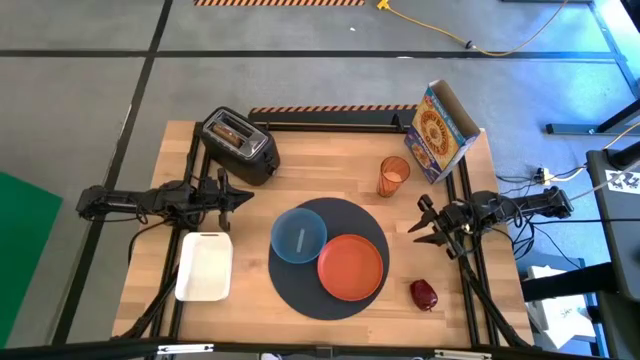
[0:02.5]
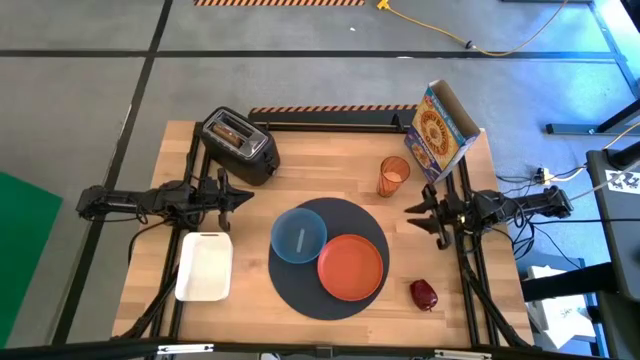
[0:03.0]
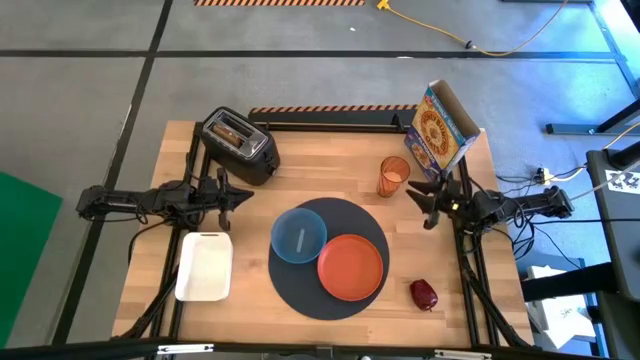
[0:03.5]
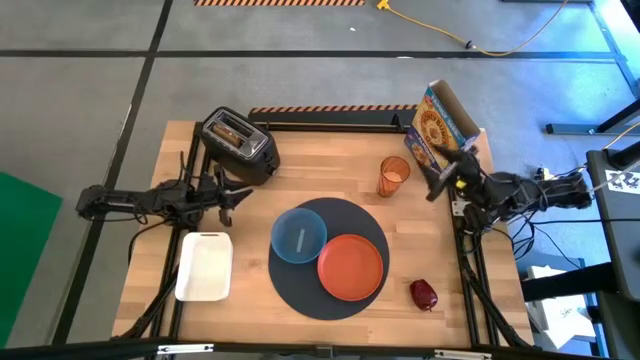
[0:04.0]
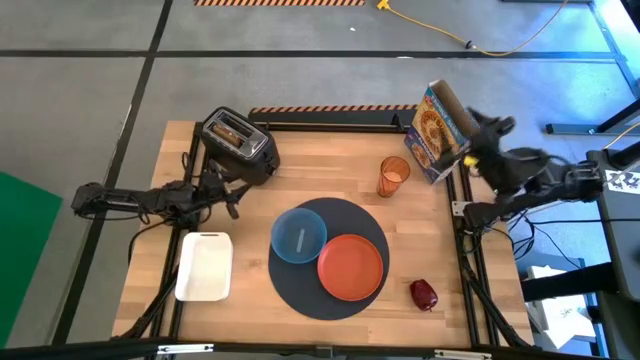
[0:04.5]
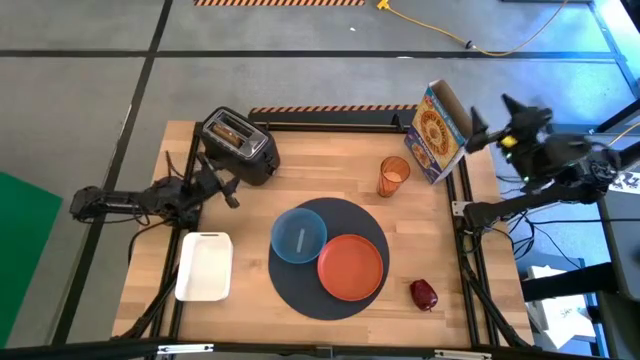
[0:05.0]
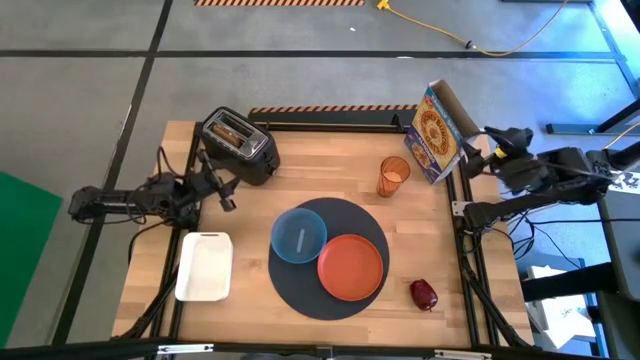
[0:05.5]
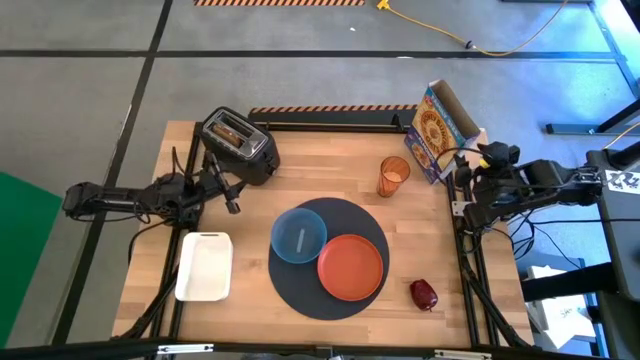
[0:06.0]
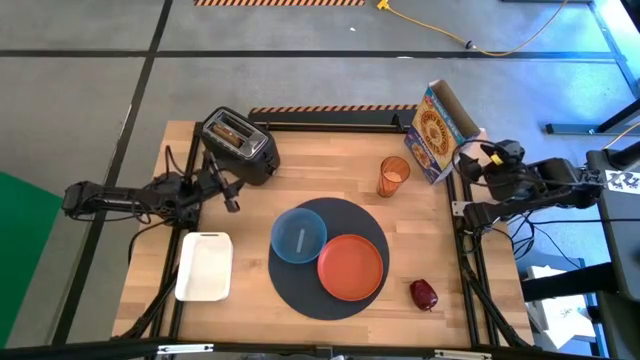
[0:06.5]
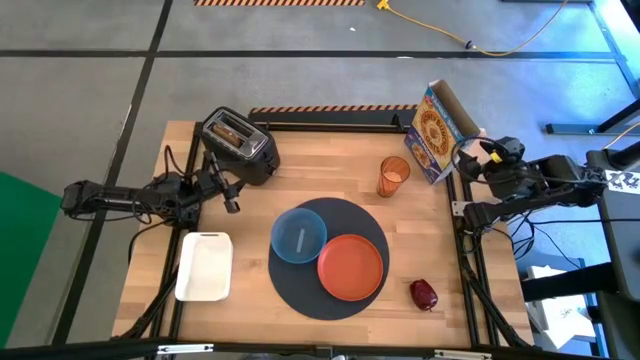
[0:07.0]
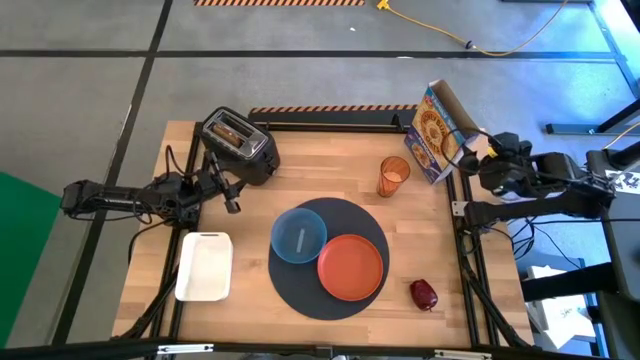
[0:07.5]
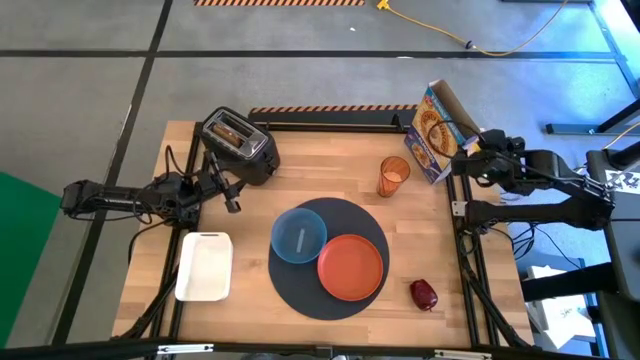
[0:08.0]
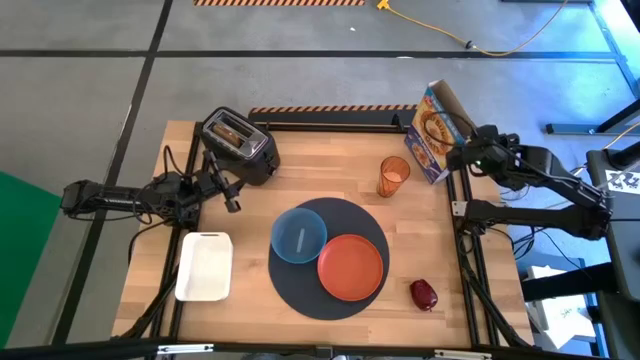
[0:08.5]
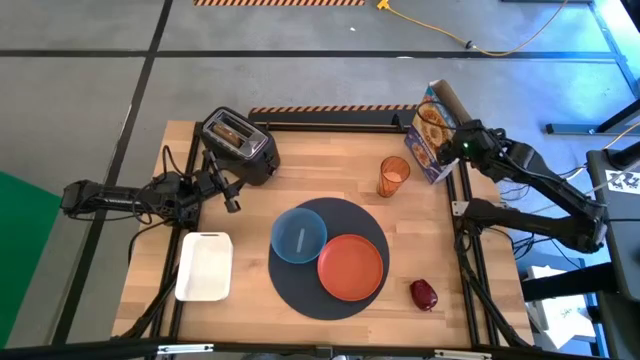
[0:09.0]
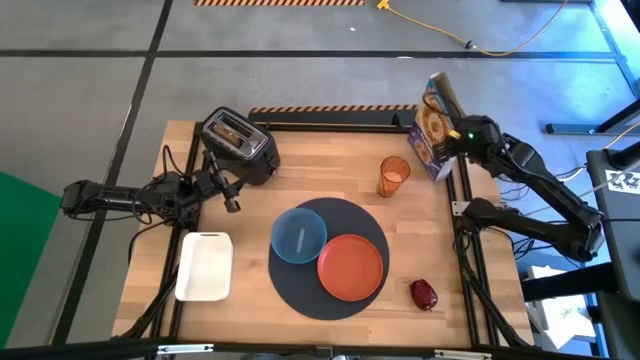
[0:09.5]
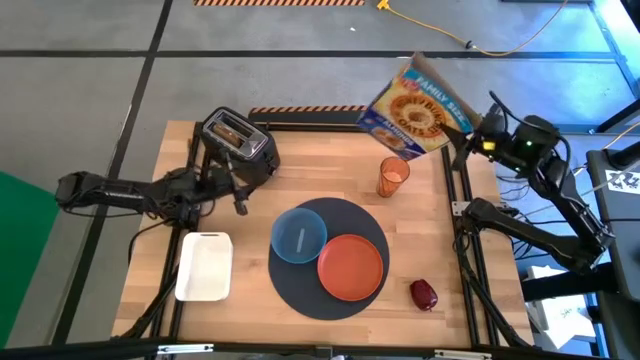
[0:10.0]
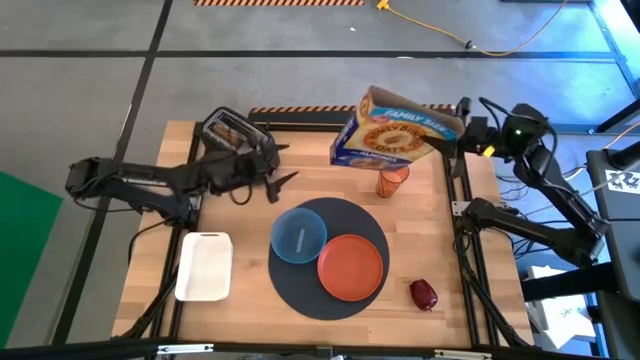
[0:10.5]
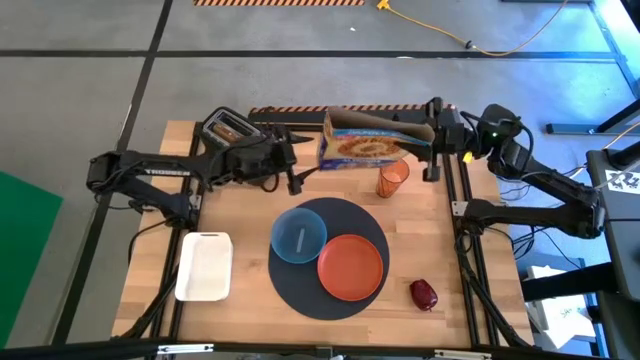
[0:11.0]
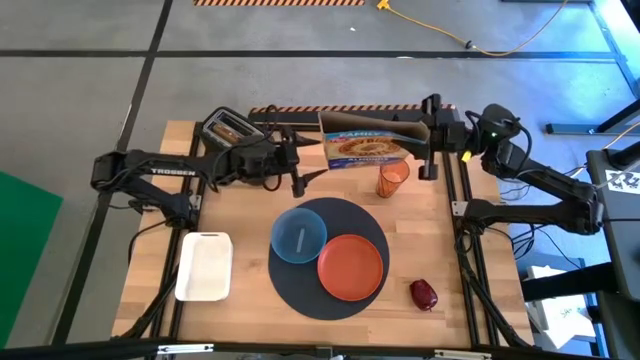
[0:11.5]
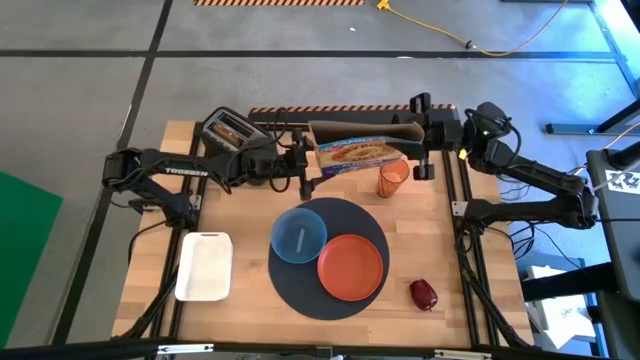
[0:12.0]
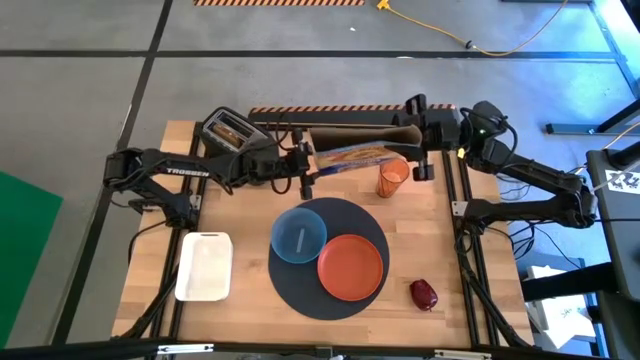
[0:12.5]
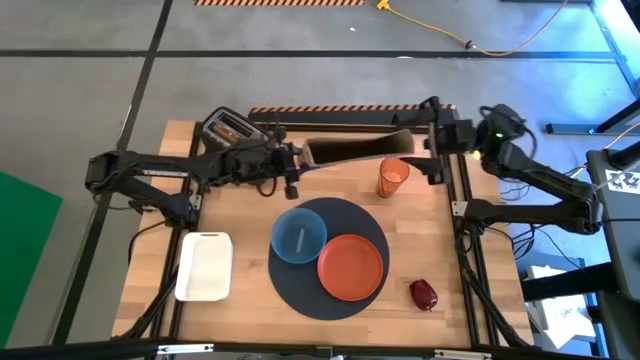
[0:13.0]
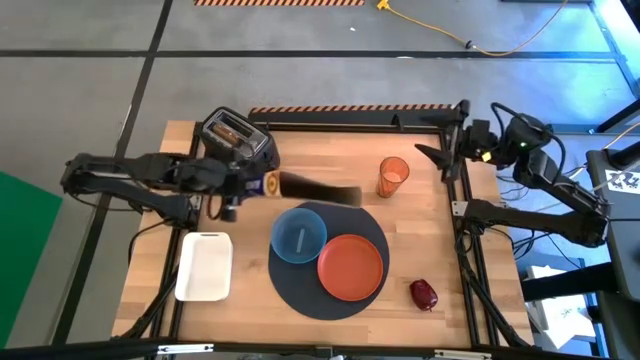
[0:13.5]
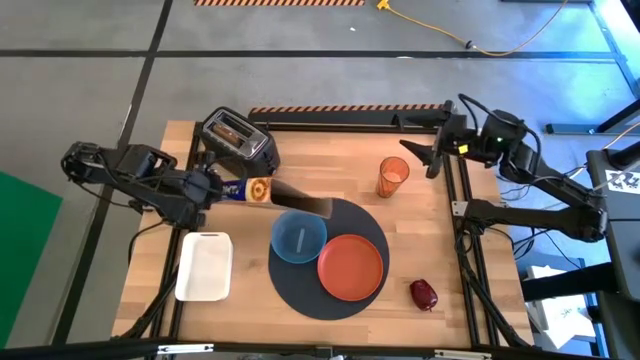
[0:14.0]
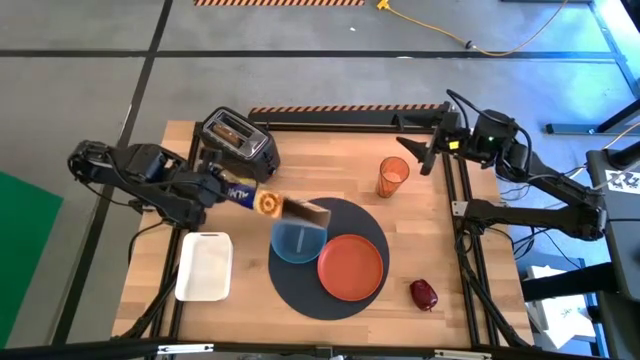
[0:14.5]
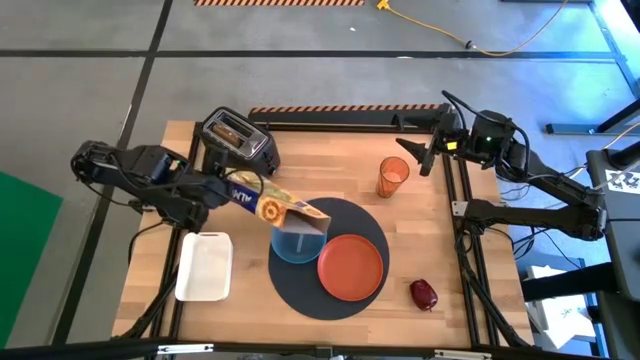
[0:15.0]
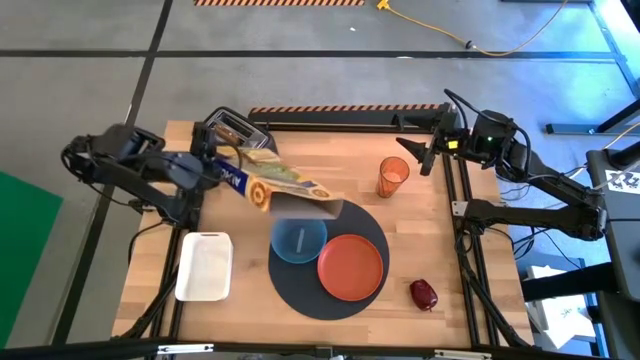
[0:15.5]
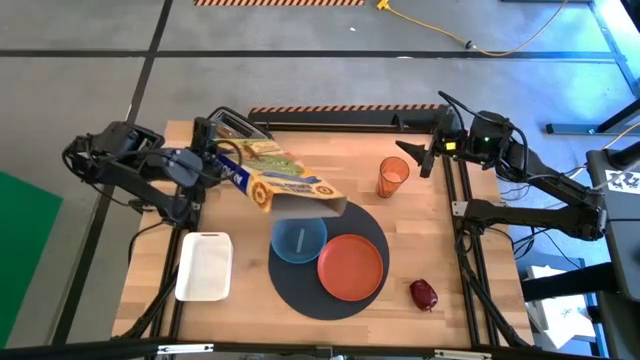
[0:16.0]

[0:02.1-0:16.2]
Task: Arrange a breakfast setting
Pour the cereal into the blue bowl

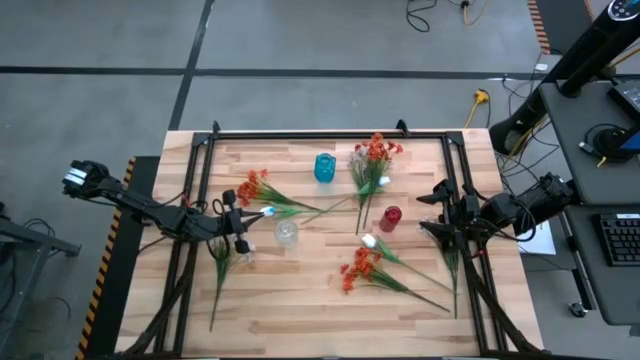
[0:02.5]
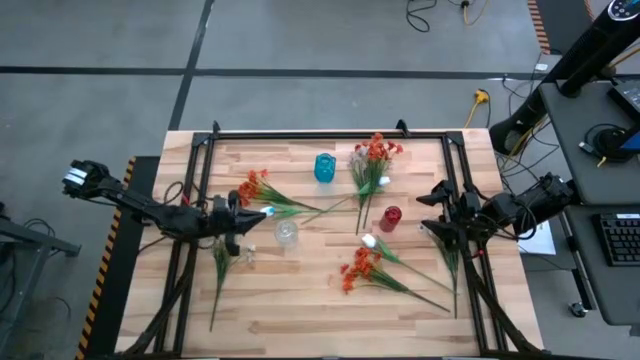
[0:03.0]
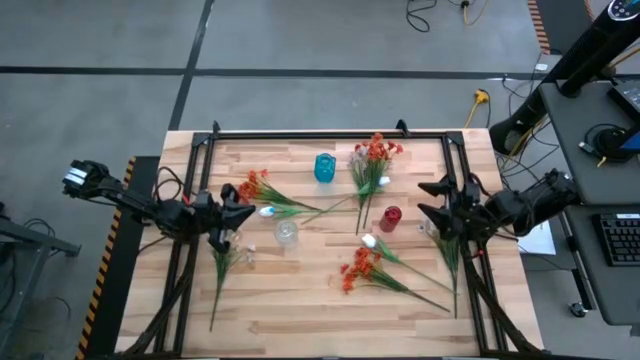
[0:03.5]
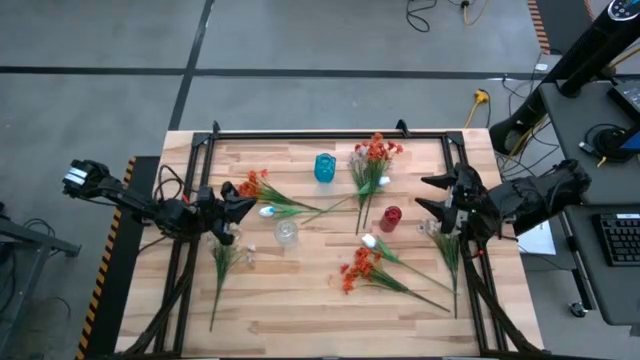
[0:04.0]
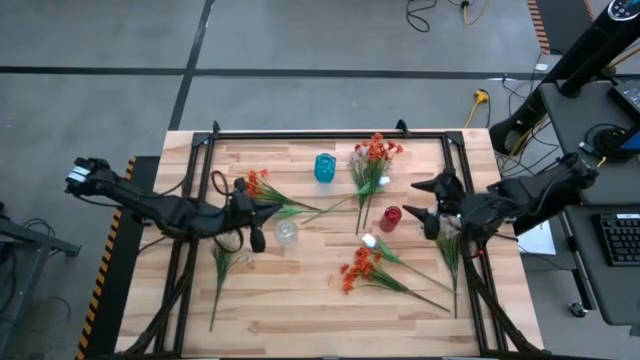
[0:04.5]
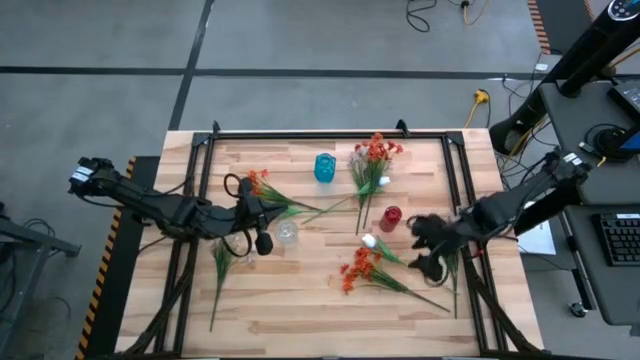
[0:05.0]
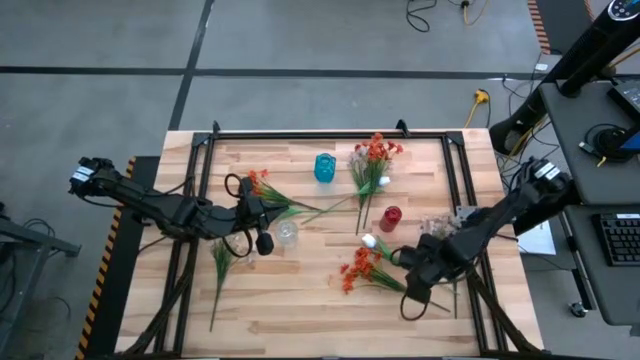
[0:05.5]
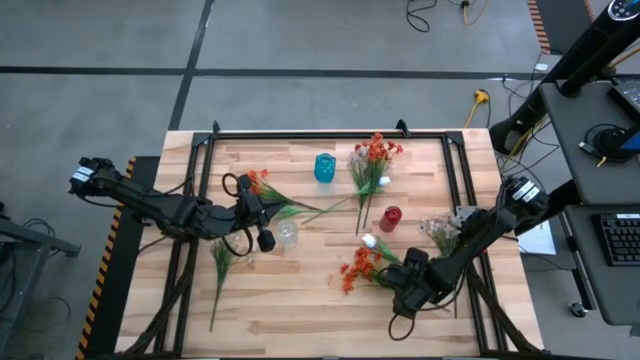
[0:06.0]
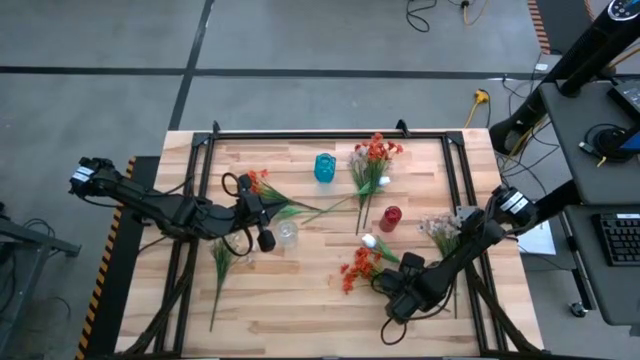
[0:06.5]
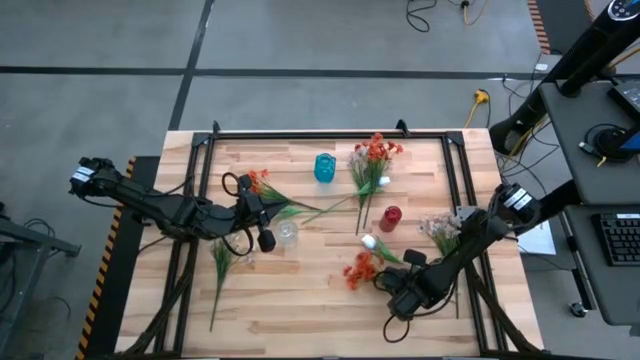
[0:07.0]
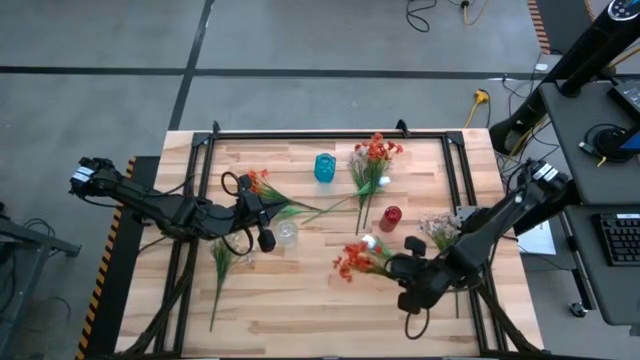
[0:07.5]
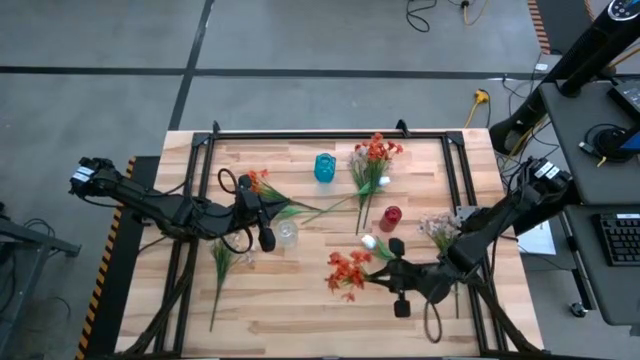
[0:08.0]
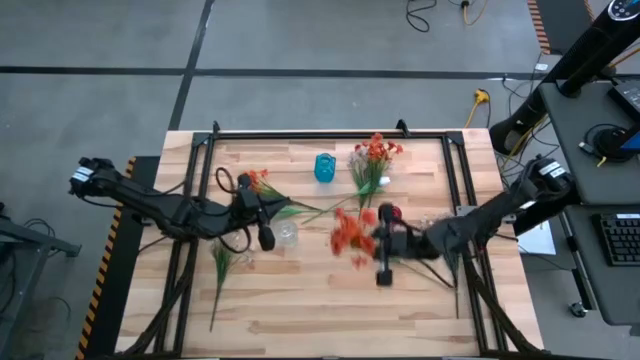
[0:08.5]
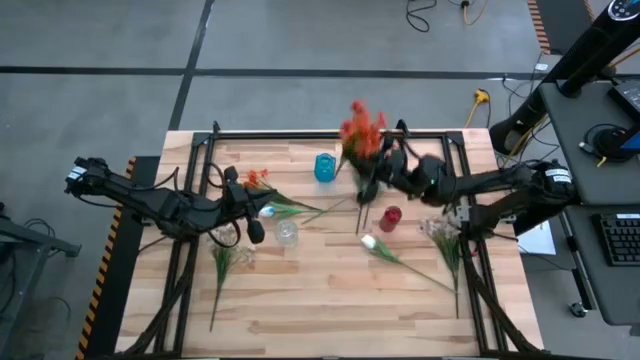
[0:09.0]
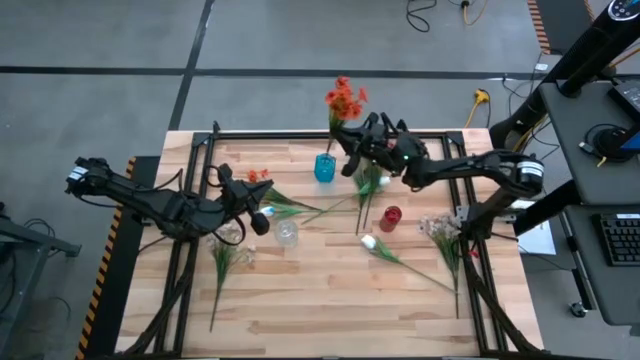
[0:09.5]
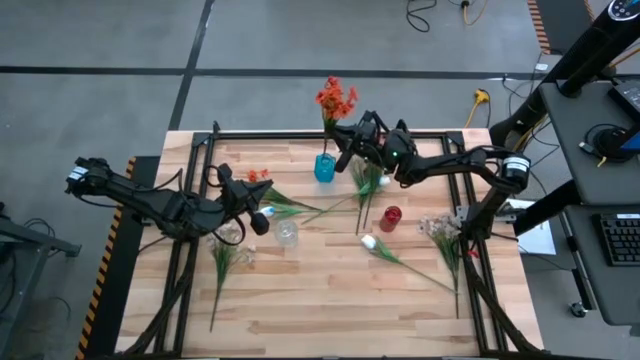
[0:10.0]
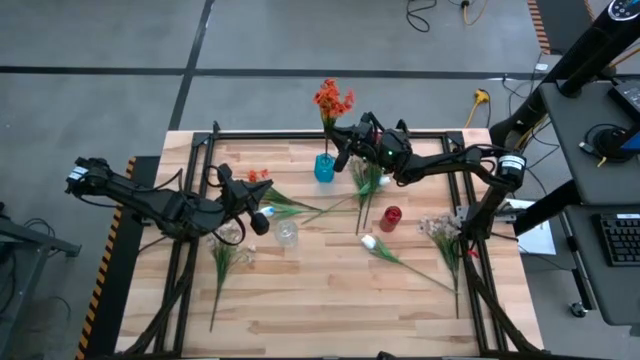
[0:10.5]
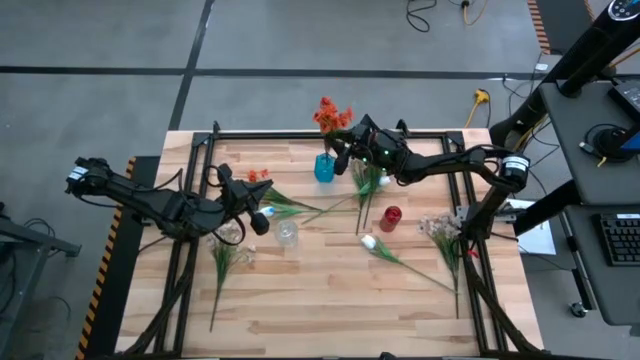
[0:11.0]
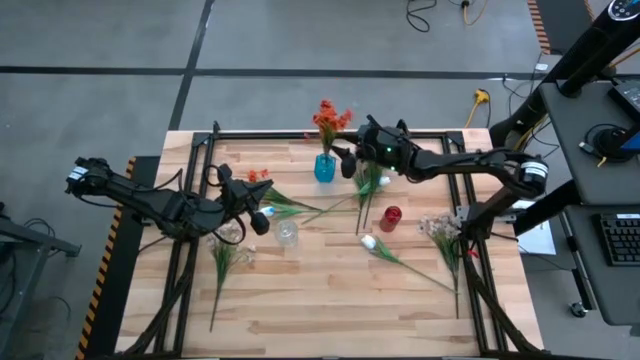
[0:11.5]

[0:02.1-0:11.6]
Task: Sort flowers into vase by color
Put the bottom orange flowers into the blue vase
